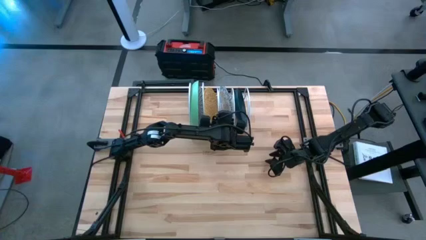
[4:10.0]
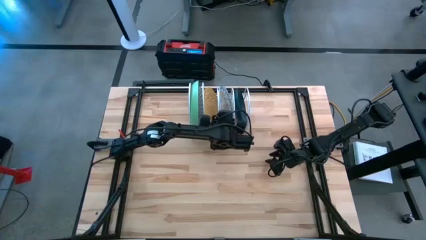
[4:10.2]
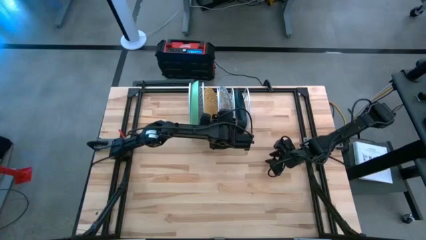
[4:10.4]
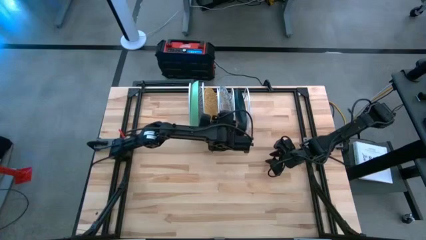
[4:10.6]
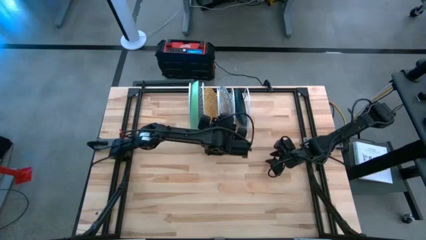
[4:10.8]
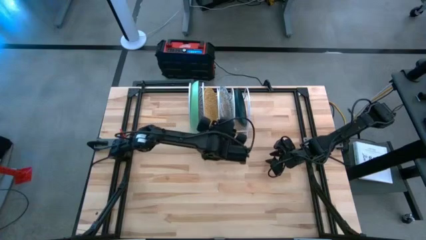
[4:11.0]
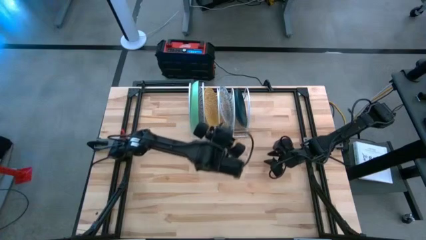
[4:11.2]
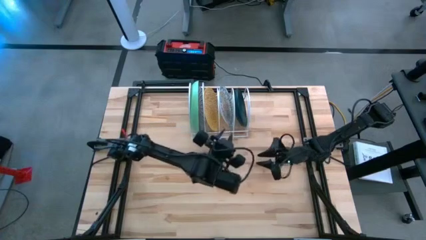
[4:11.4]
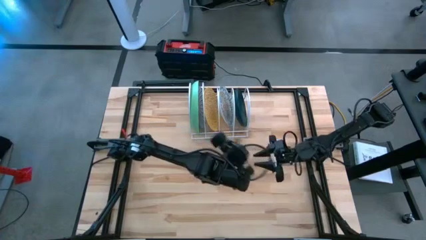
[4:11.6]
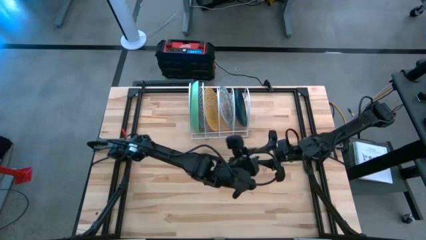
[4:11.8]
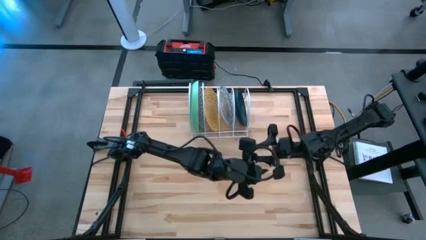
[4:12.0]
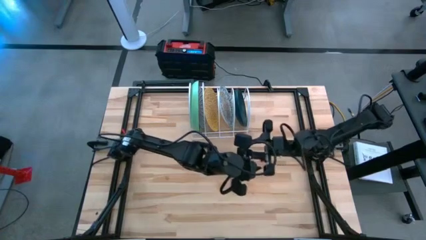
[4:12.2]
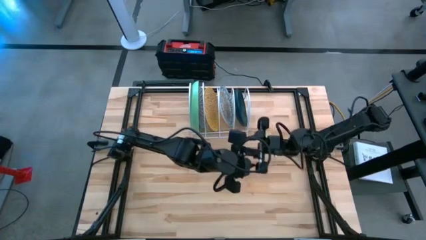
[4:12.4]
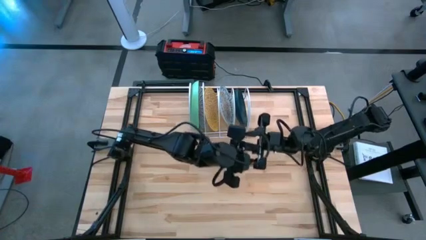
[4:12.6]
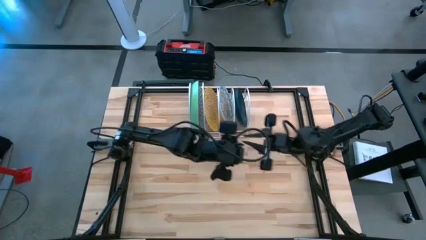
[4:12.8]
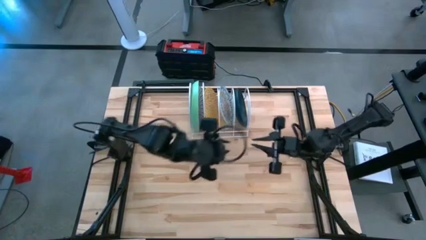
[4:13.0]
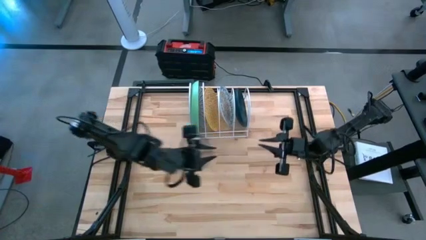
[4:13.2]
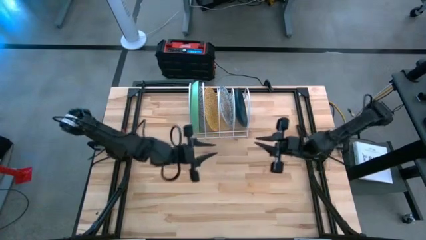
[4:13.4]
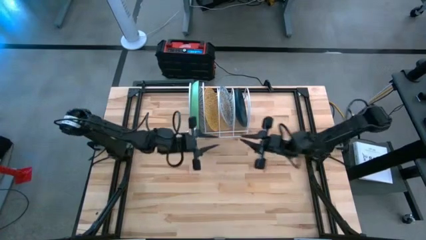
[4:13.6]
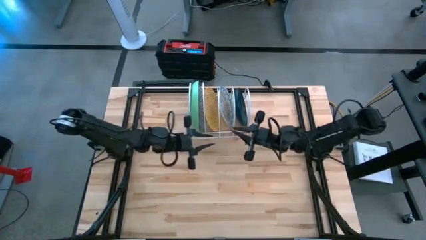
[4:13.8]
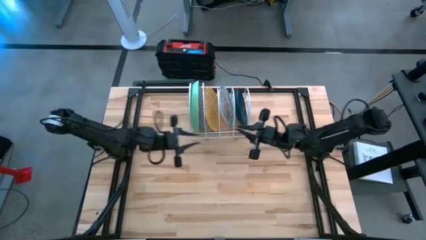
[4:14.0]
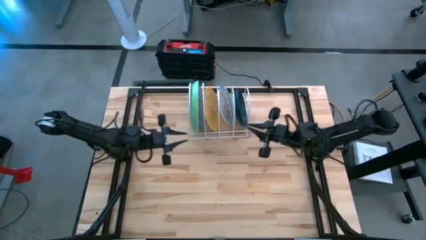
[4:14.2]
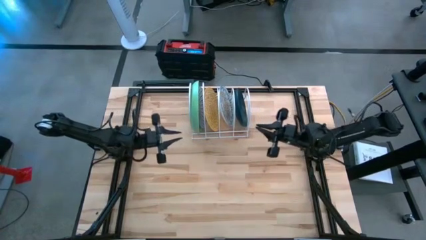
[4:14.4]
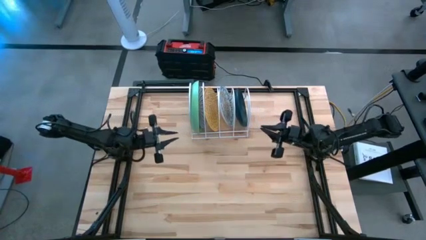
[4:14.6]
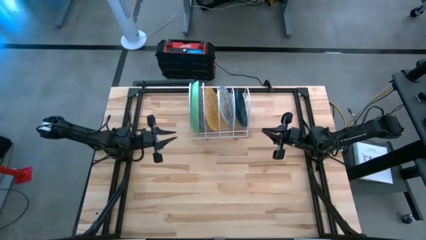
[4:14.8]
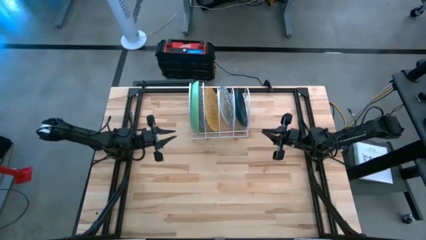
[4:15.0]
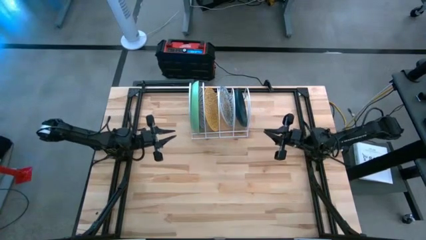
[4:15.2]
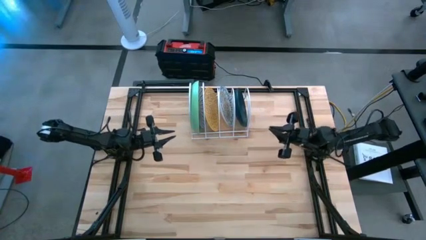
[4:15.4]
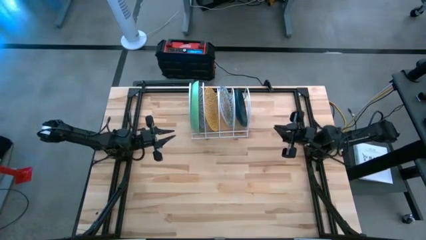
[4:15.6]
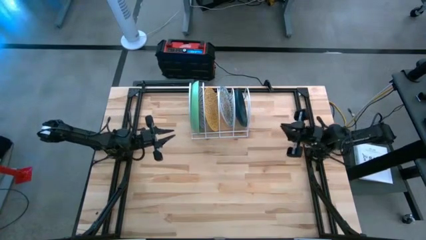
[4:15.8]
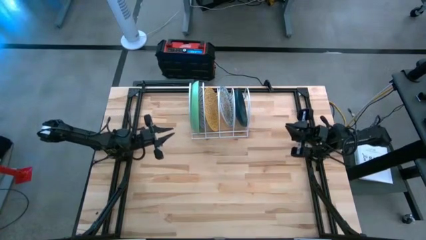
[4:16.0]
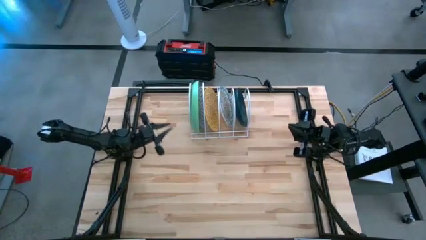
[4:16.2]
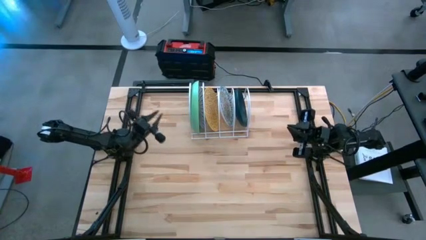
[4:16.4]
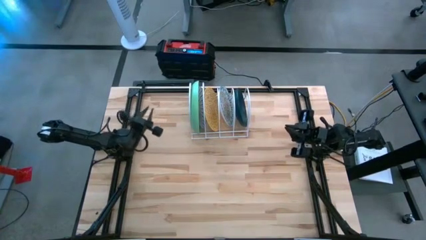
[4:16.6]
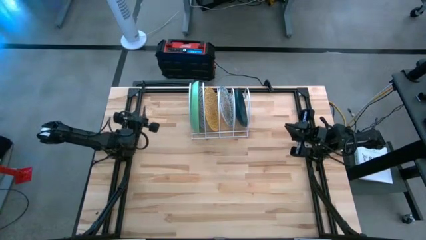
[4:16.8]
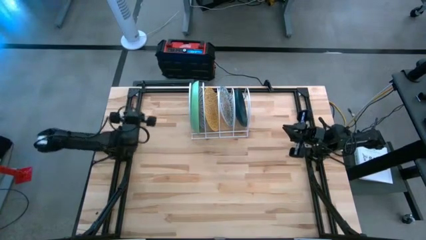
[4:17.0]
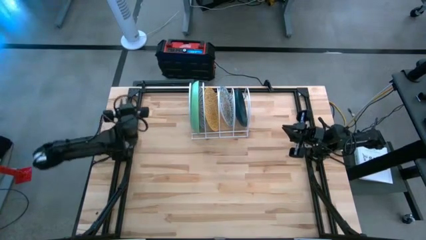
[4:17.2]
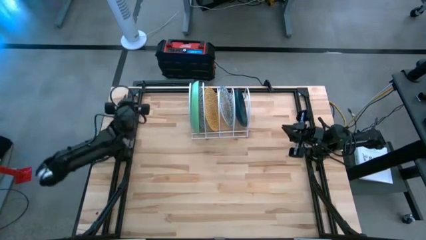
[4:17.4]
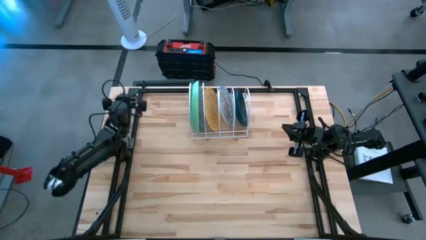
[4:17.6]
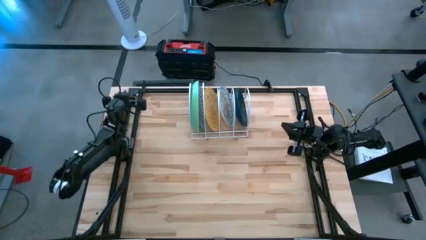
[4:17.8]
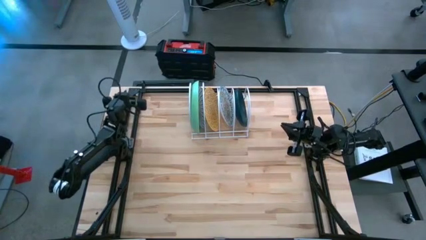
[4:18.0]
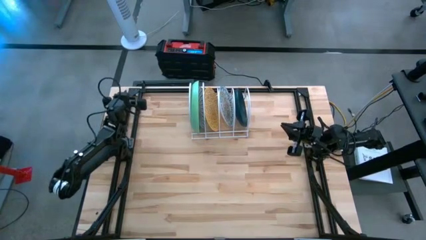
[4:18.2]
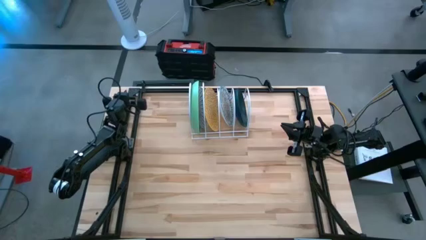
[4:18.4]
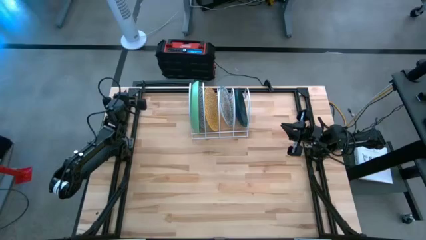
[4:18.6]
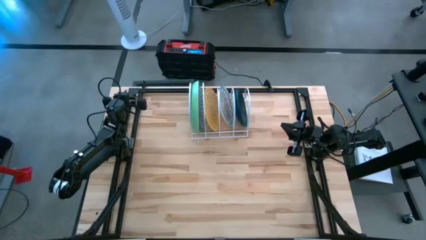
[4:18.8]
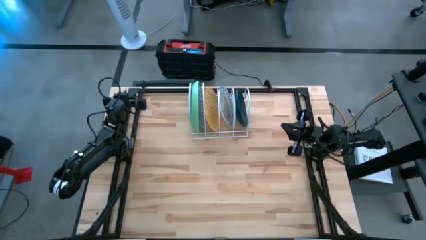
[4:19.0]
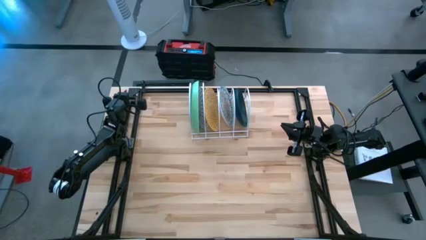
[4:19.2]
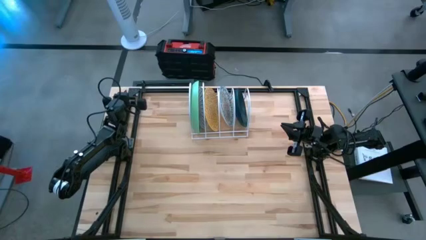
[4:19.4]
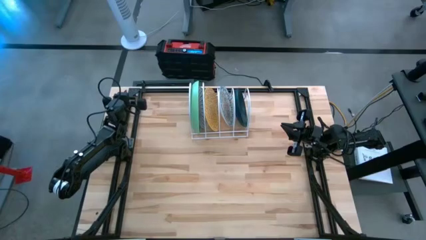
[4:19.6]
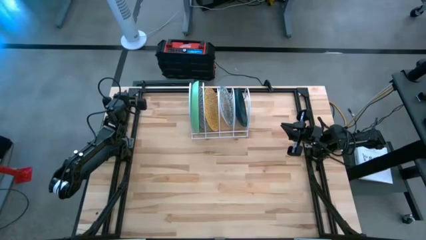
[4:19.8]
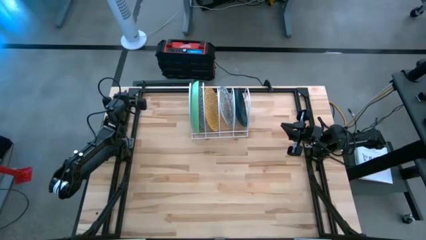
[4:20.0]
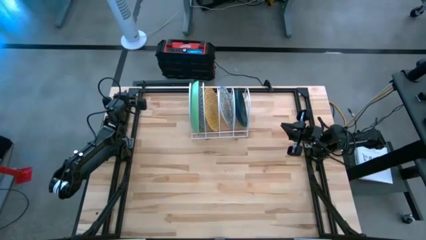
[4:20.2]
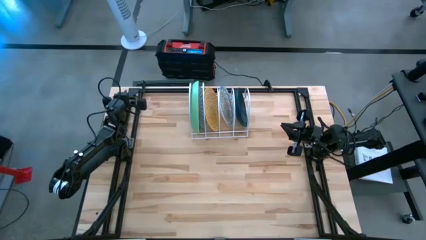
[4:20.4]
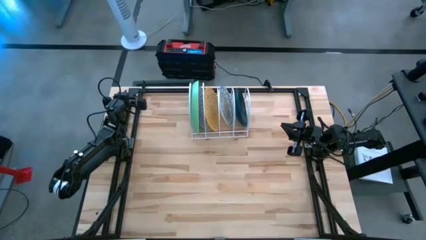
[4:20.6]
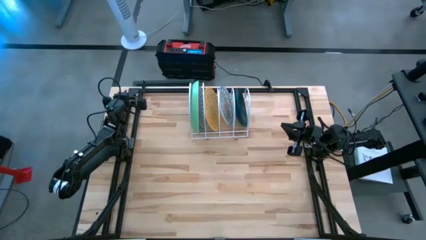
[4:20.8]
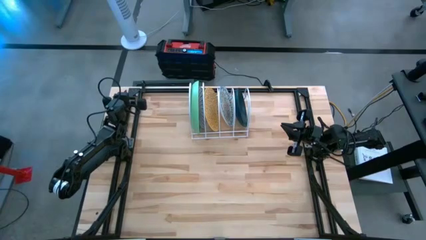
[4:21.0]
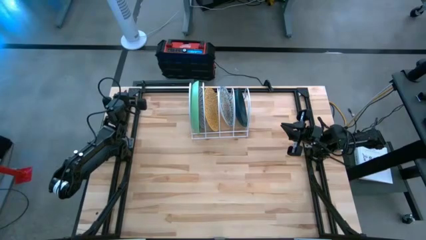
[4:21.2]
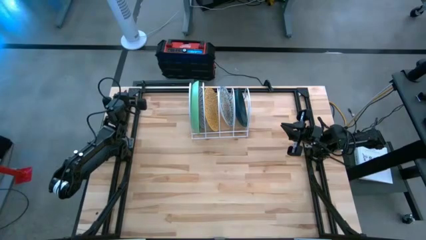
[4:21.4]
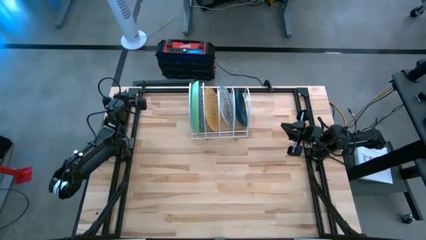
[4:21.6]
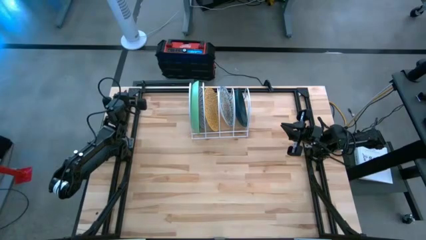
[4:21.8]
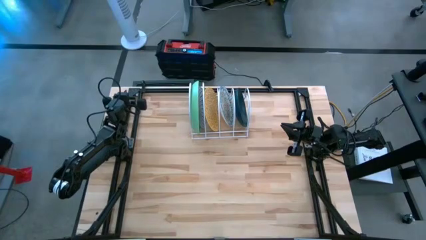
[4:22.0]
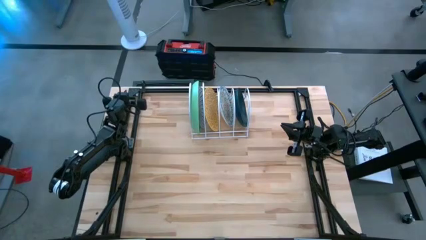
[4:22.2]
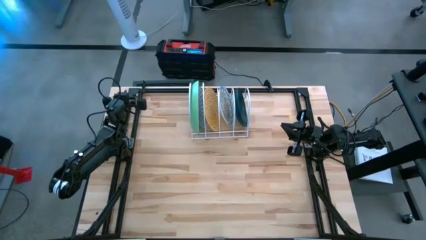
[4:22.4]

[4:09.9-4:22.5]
Task: Sort dishes
Return to Home Position
